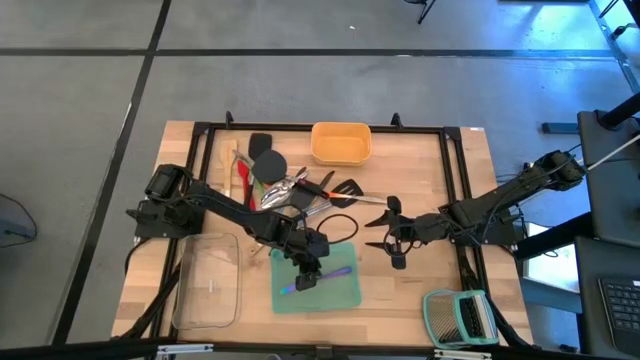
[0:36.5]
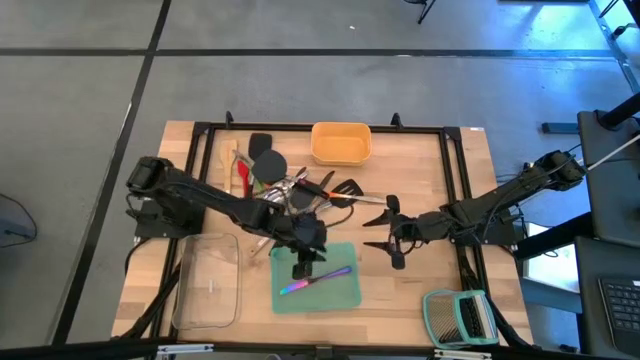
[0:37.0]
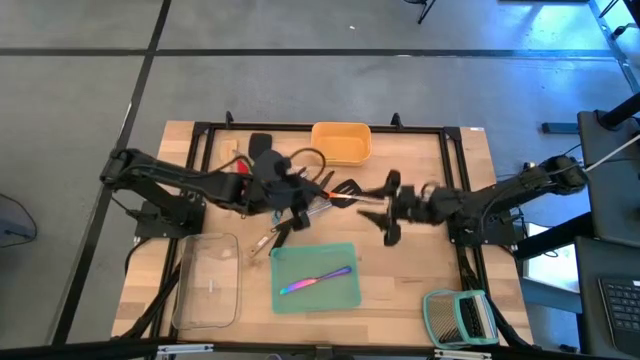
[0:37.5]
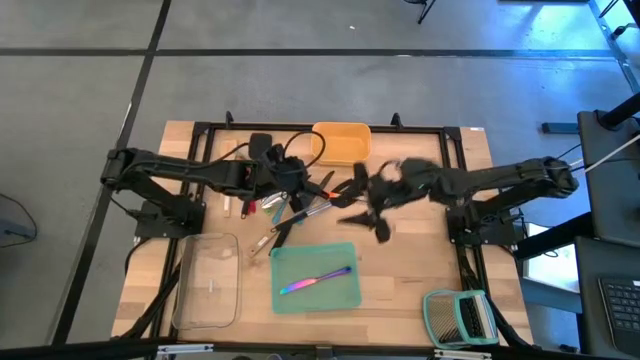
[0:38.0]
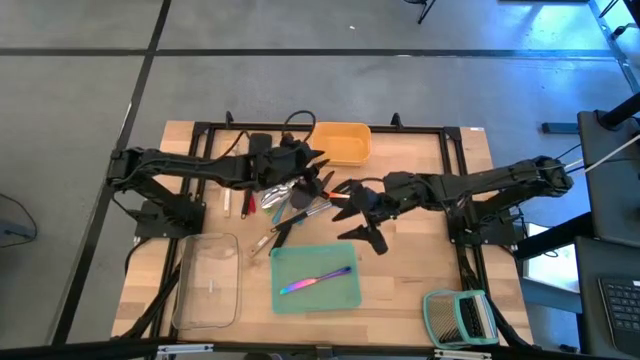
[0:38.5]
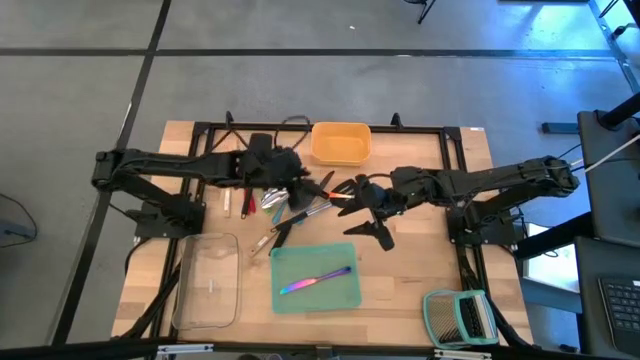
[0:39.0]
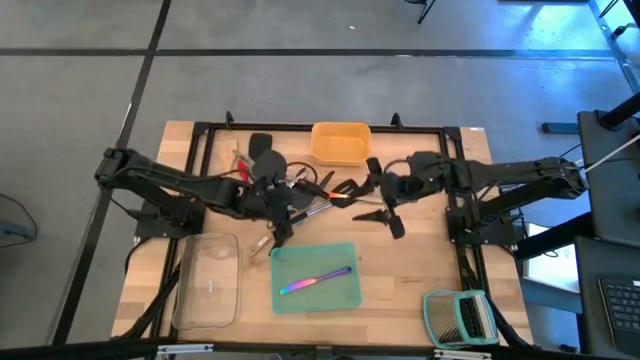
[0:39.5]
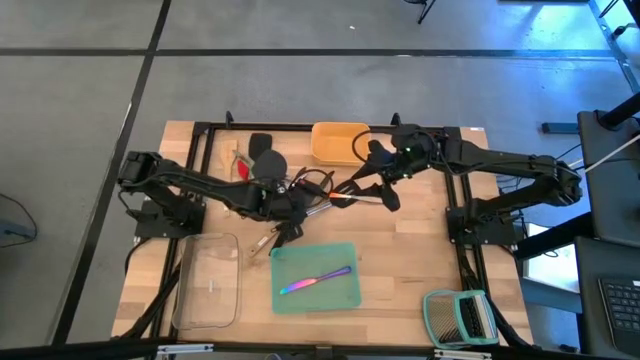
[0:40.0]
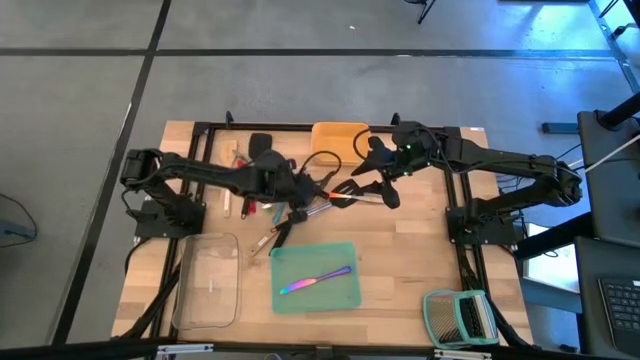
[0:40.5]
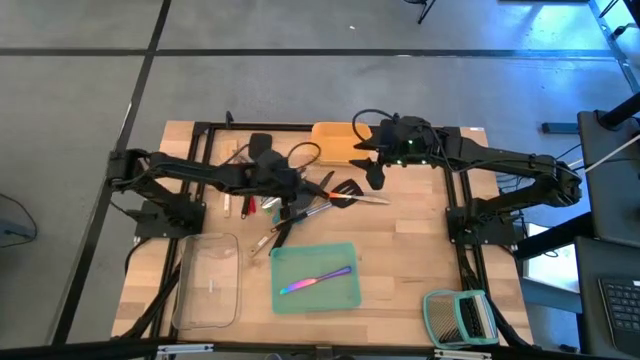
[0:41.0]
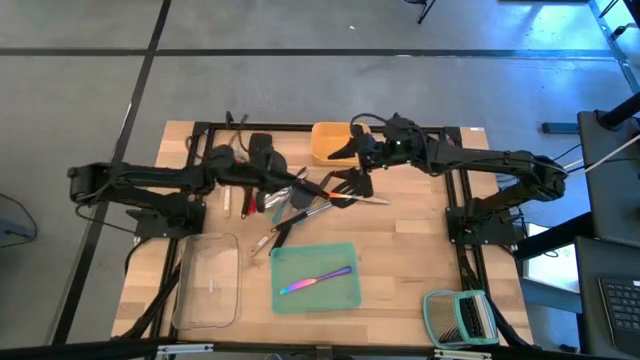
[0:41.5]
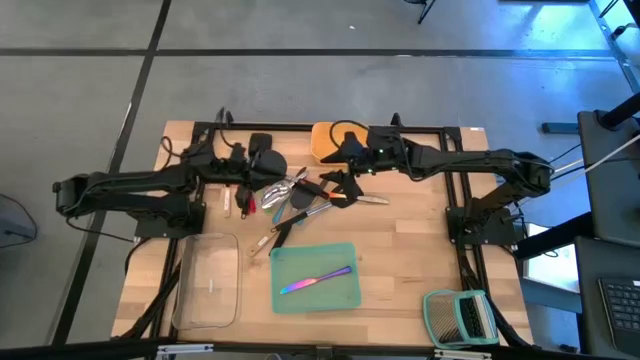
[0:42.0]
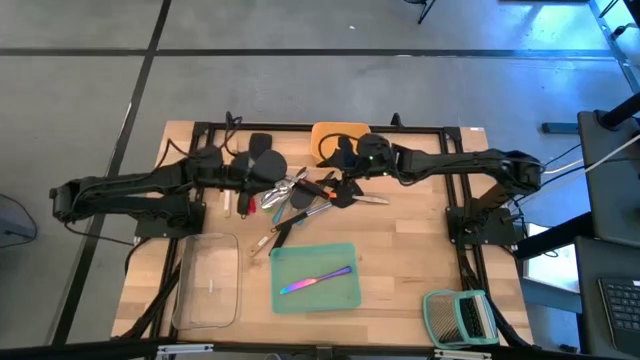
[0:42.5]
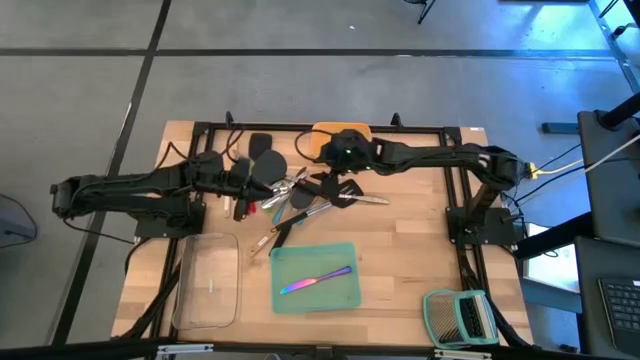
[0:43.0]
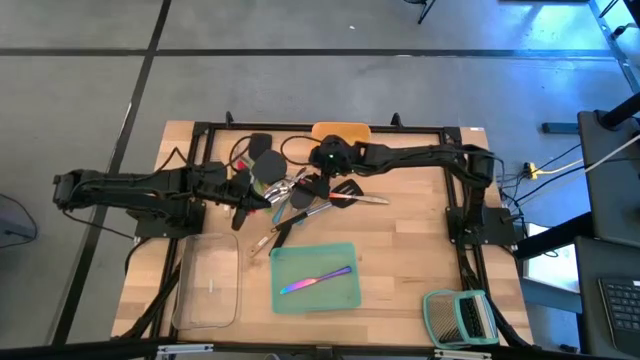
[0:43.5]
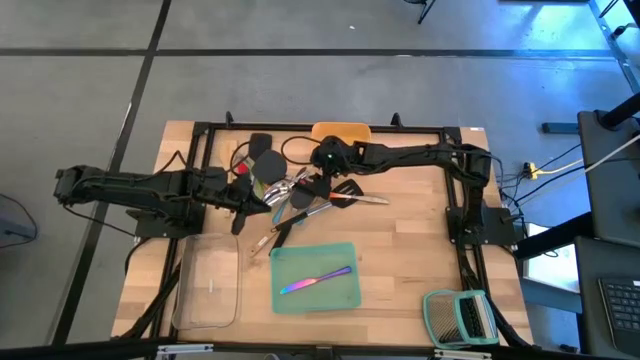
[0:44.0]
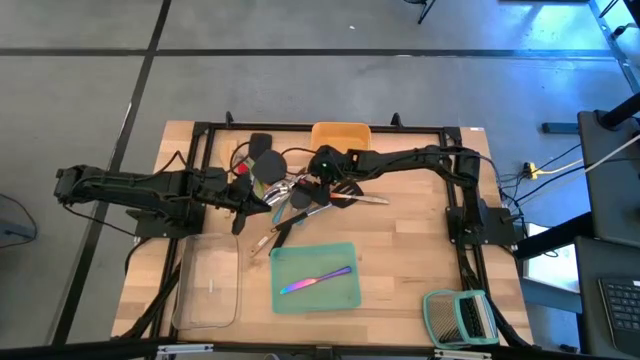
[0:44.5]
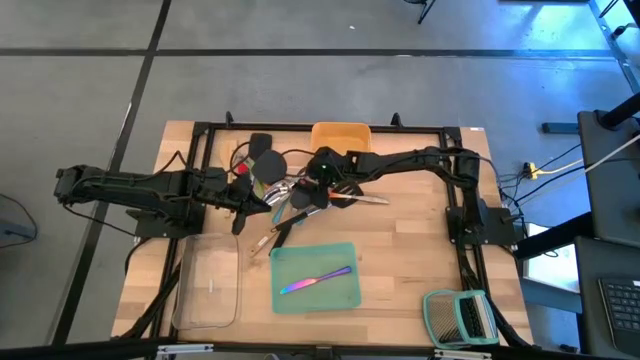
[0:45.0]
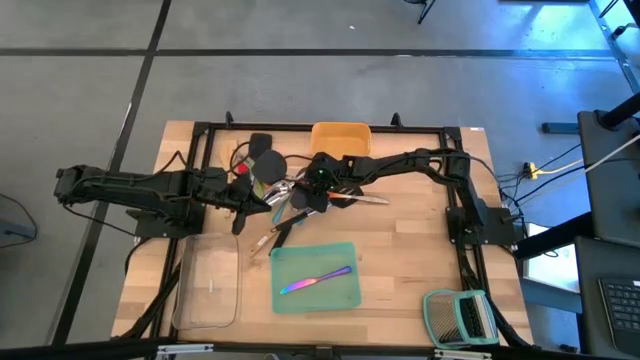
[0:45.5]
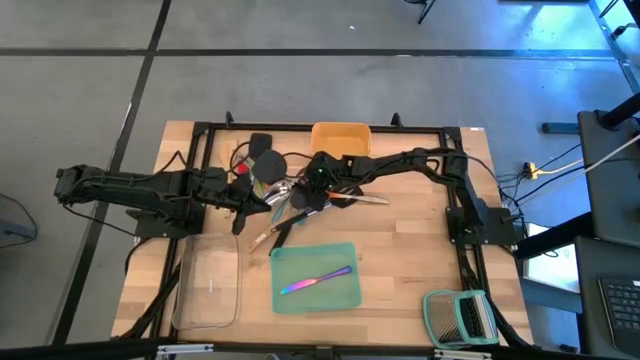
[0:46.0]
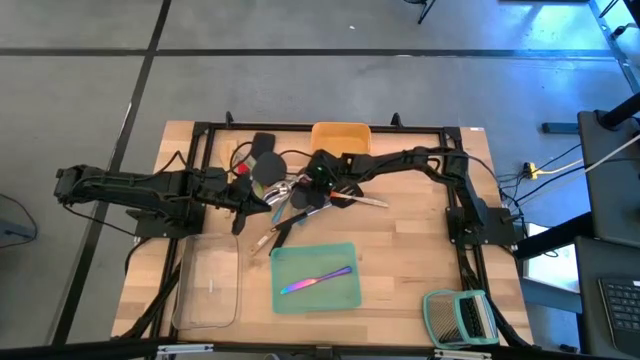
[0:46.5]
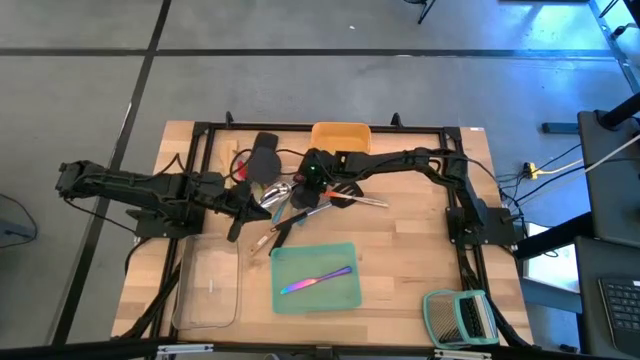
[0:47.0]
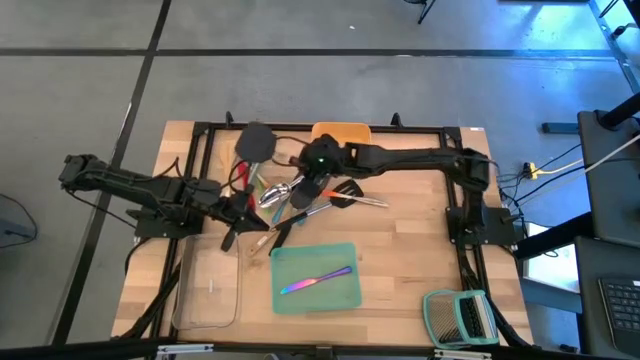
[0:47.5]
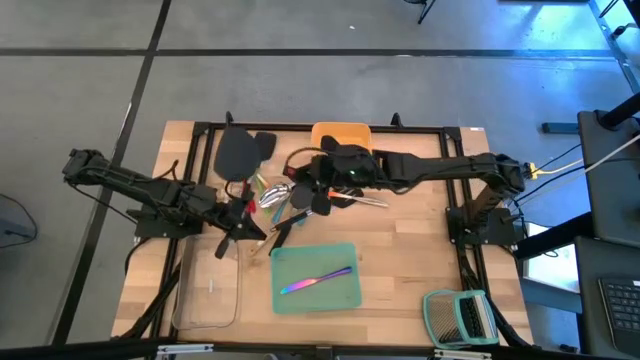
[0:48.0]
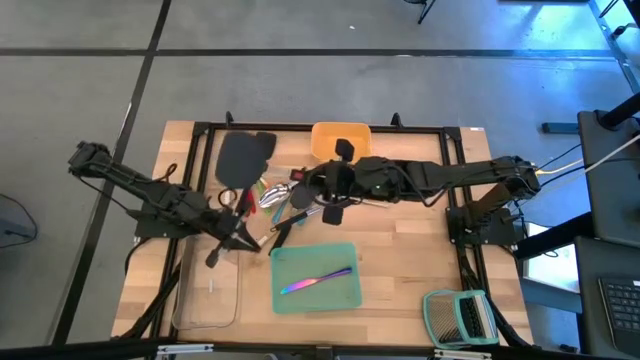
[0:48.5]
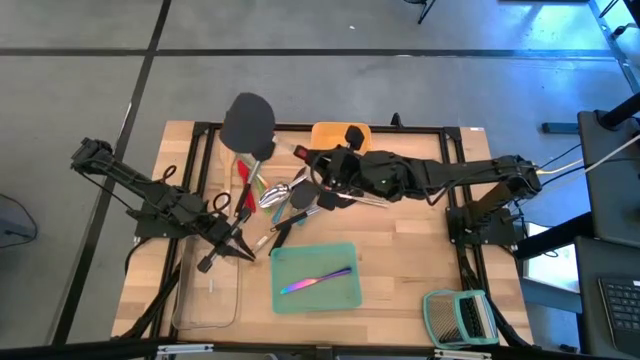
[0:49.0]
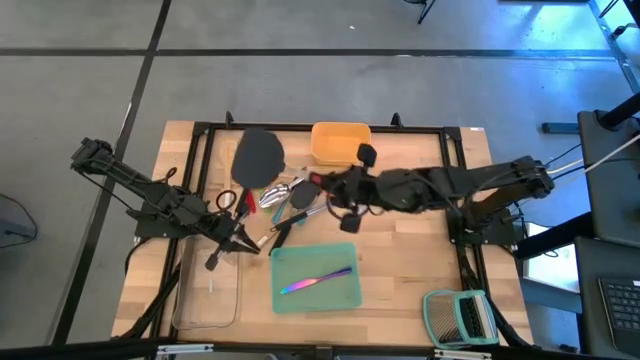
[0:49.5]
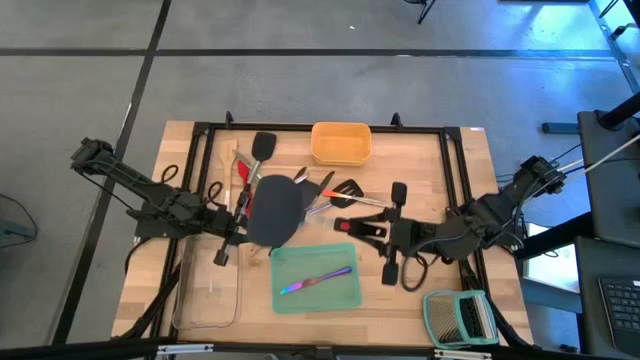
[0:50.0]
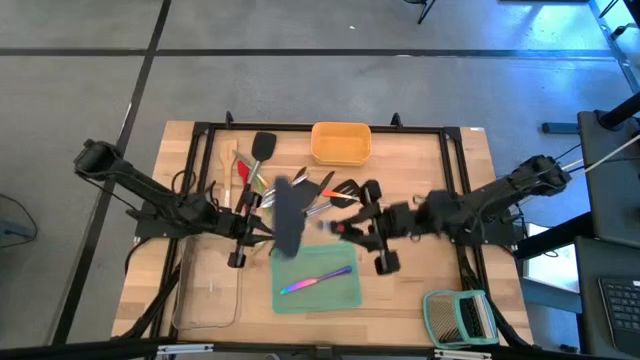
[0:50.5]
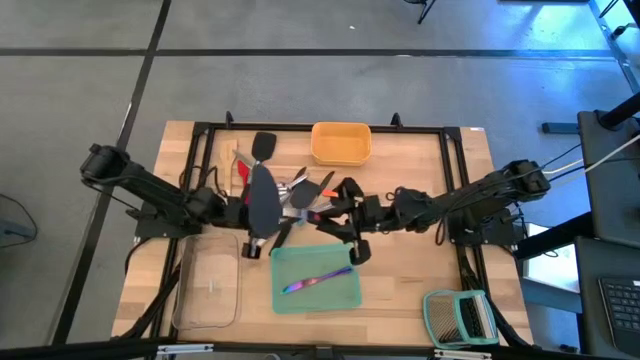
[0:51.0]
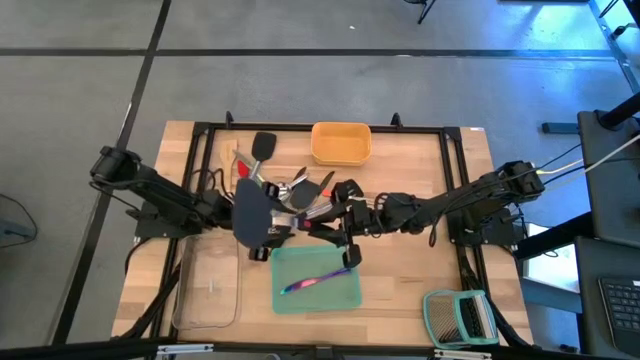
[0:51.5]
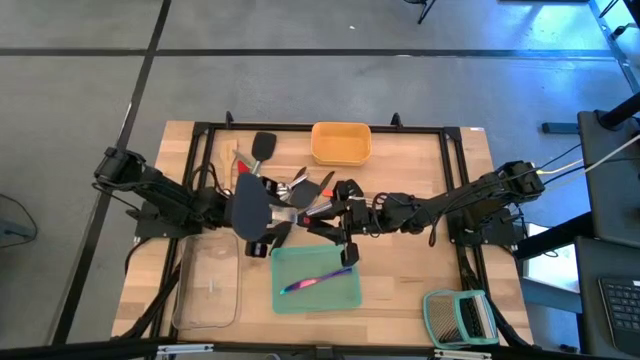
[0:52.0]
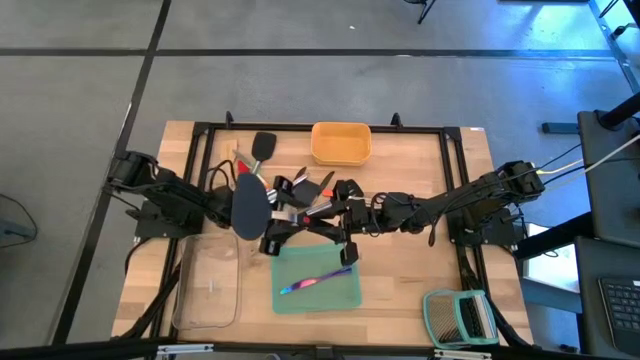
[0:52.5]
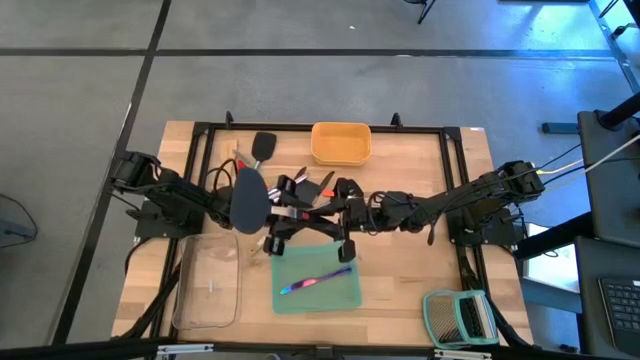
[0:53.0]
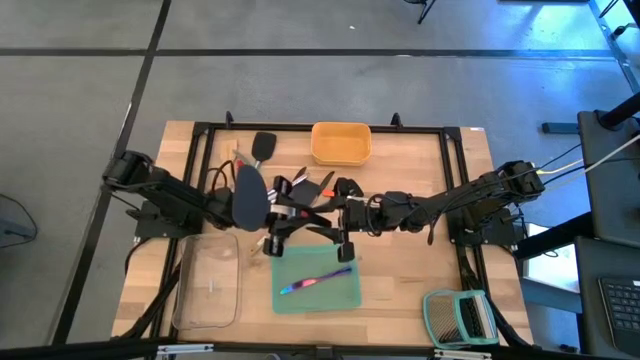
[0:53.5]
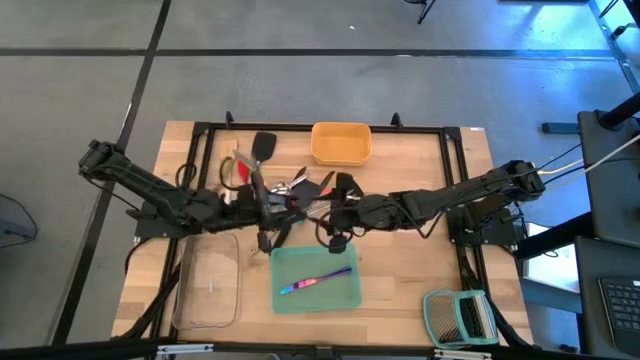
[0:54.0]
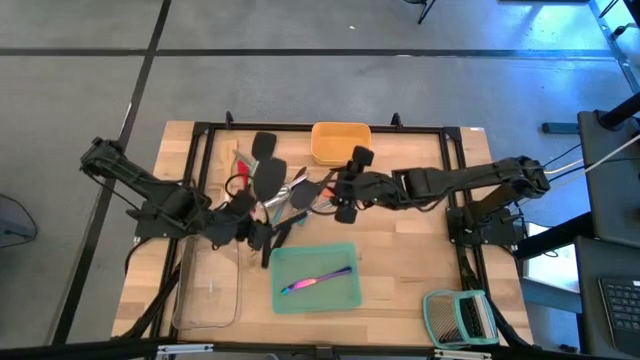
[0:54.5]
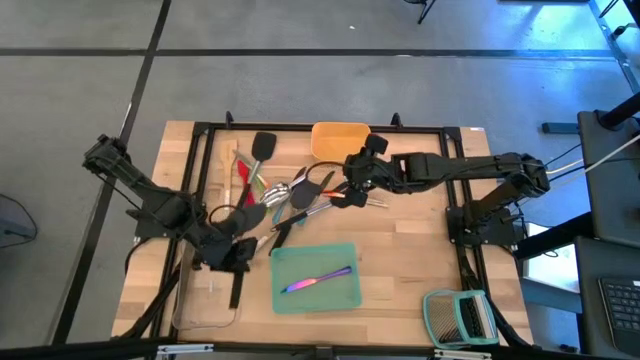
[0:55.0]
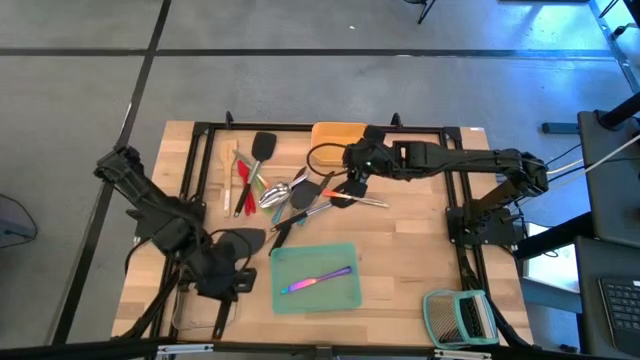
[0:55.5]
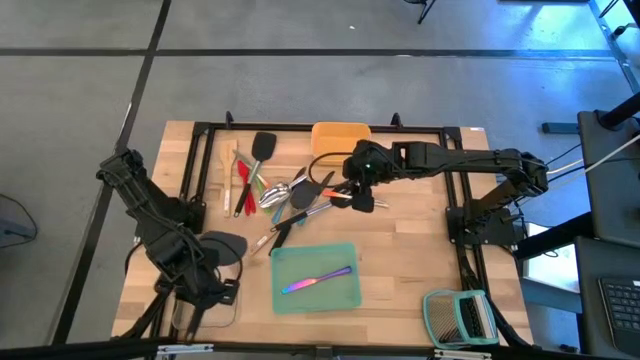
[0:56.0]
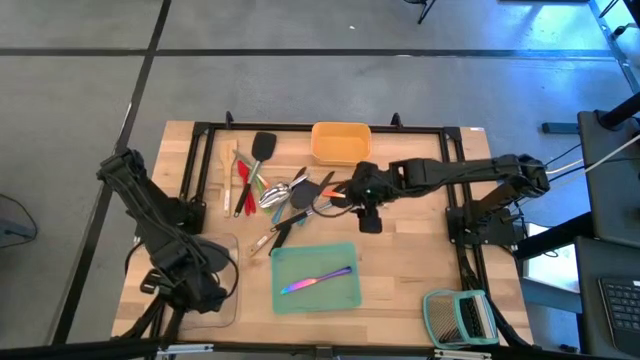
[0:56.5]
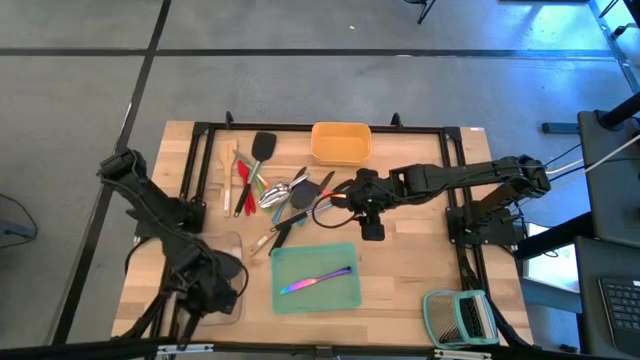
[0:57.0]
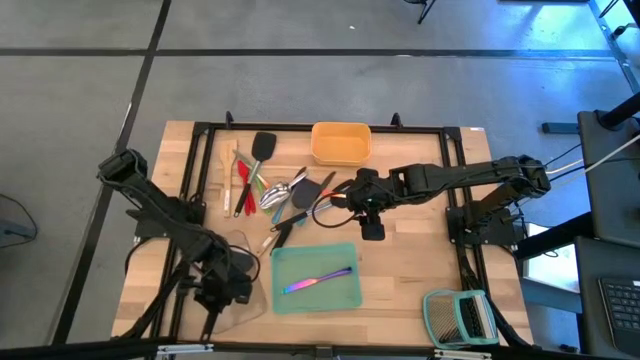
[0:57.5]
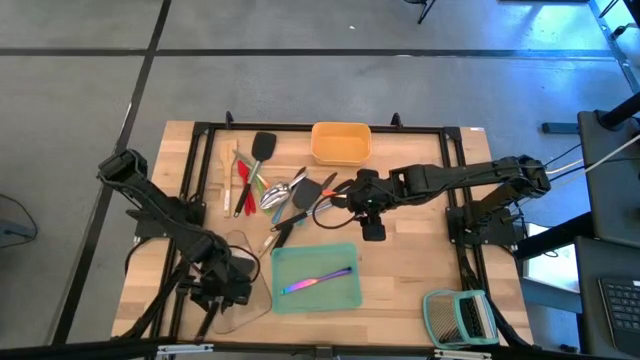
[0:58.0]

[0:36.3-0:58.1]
Task: Pick & Place Kitchen Items
Put the black spatula into the transparent bin
